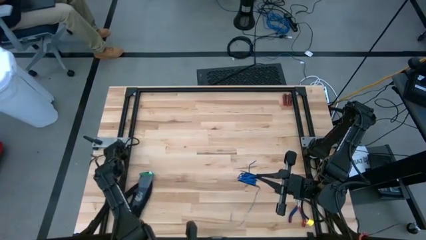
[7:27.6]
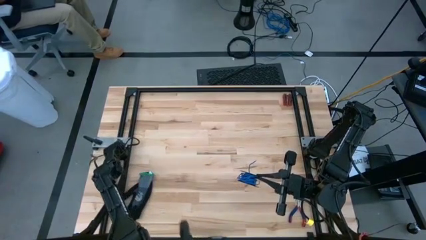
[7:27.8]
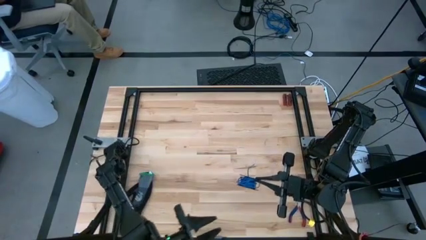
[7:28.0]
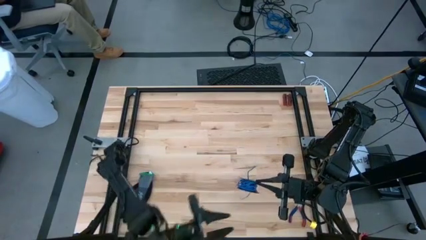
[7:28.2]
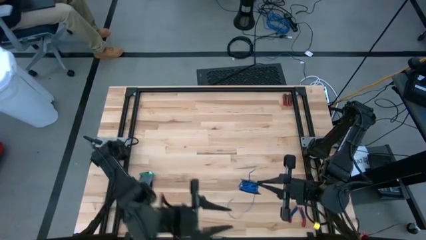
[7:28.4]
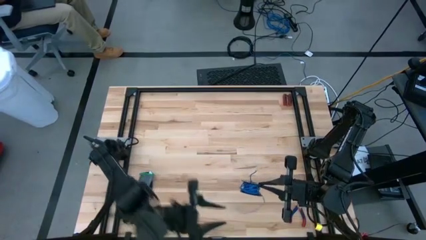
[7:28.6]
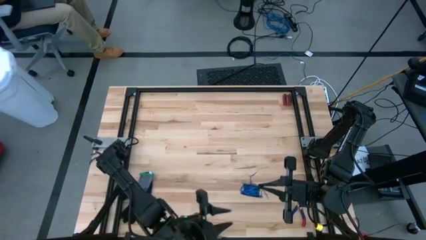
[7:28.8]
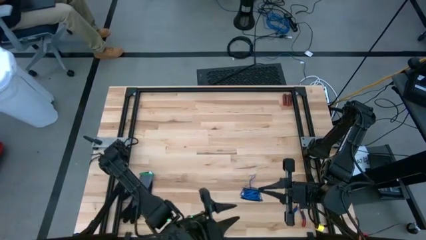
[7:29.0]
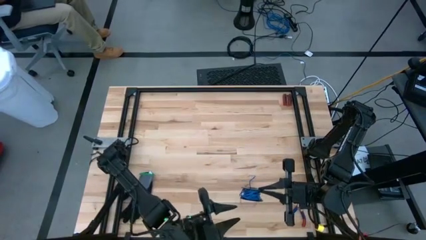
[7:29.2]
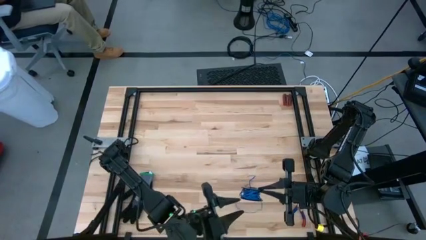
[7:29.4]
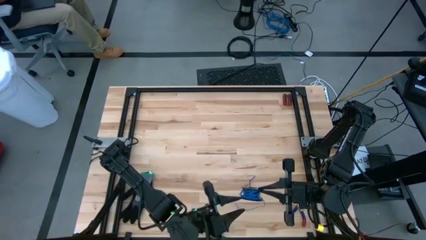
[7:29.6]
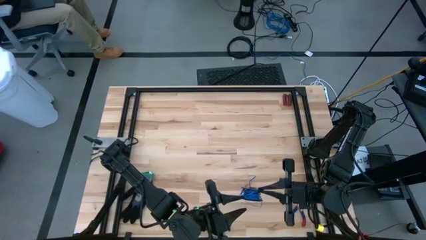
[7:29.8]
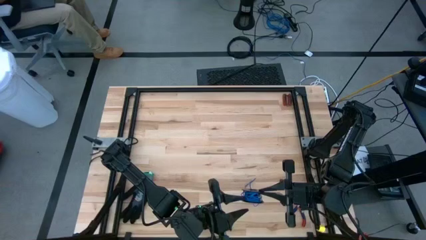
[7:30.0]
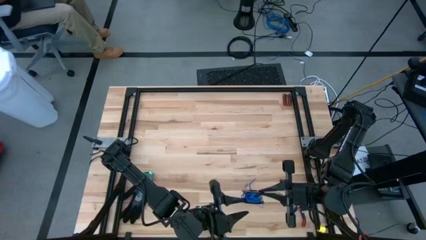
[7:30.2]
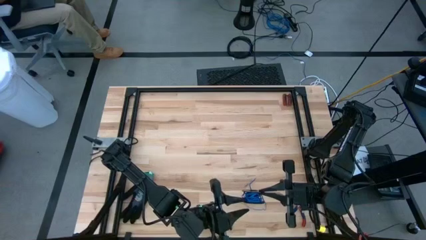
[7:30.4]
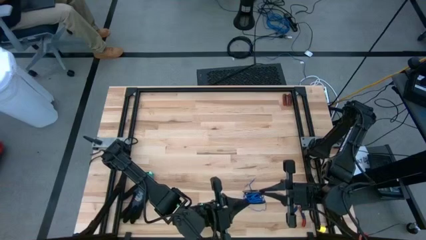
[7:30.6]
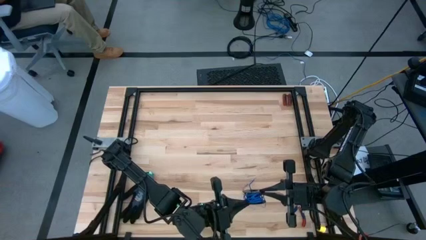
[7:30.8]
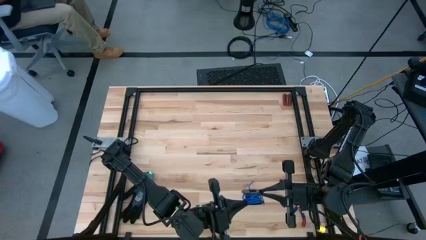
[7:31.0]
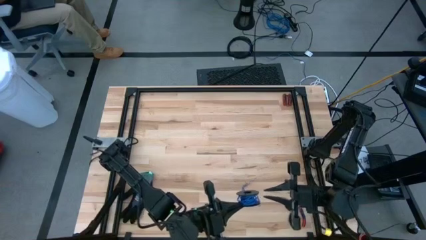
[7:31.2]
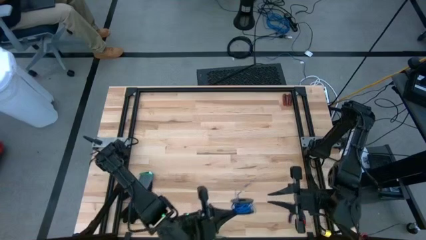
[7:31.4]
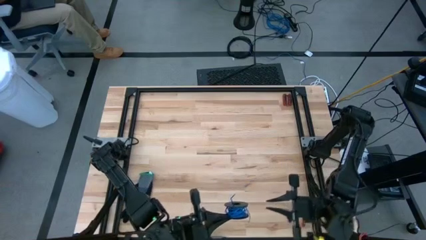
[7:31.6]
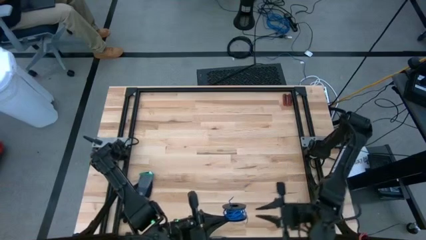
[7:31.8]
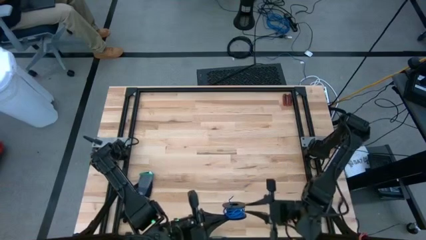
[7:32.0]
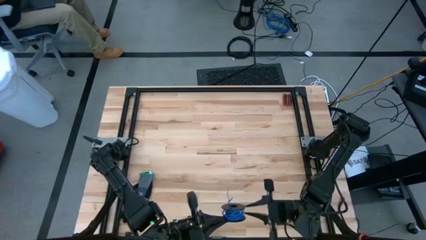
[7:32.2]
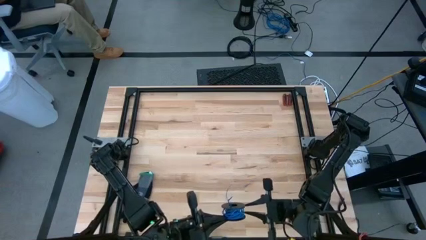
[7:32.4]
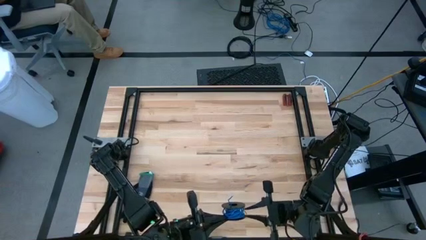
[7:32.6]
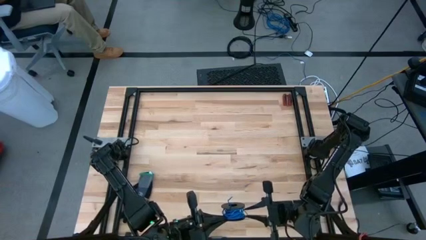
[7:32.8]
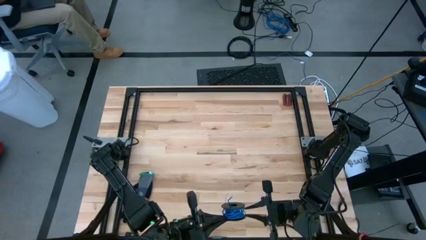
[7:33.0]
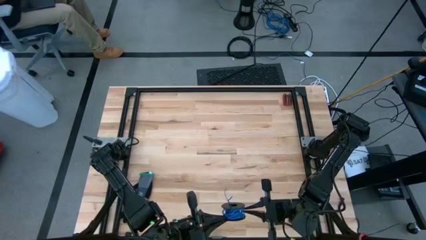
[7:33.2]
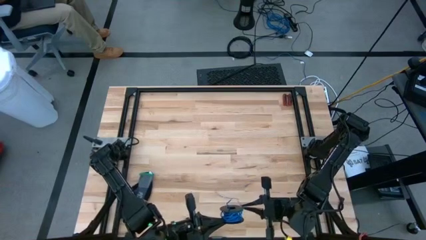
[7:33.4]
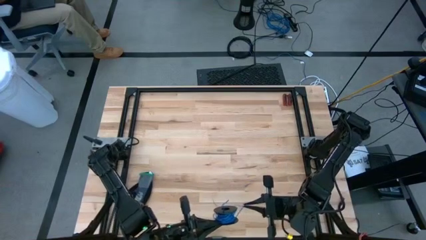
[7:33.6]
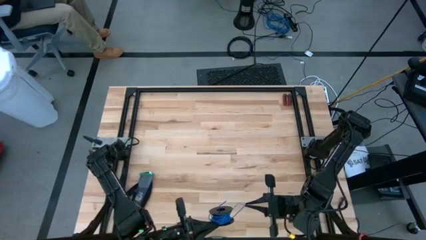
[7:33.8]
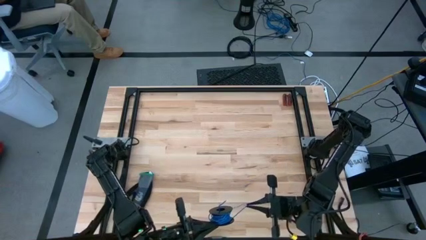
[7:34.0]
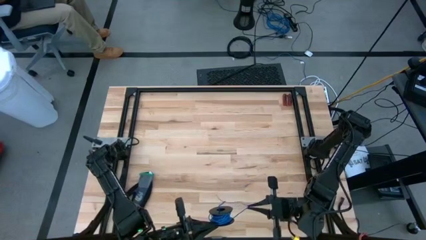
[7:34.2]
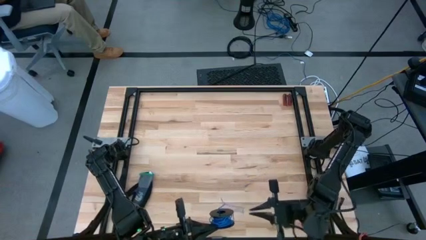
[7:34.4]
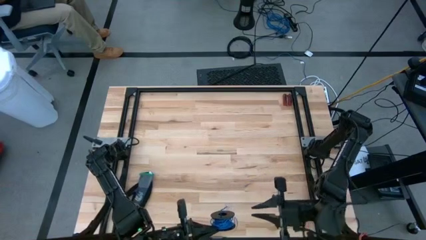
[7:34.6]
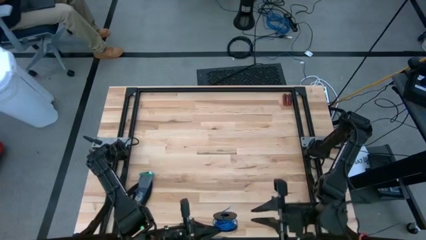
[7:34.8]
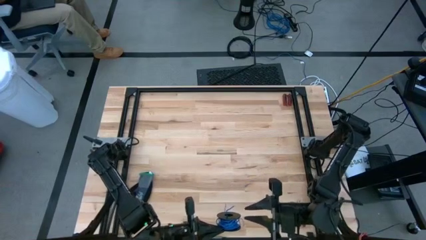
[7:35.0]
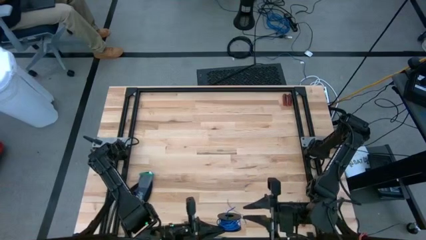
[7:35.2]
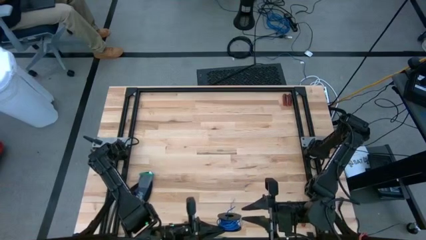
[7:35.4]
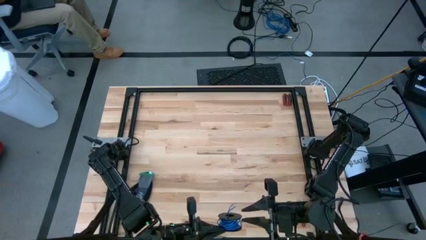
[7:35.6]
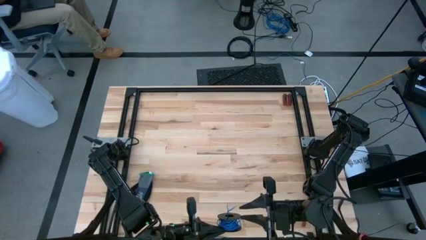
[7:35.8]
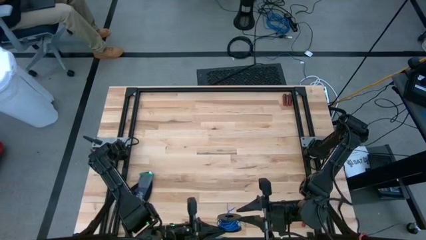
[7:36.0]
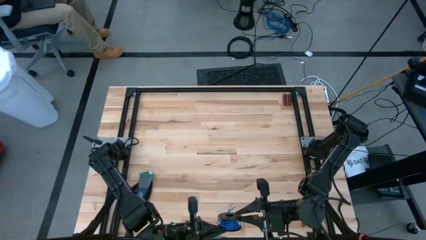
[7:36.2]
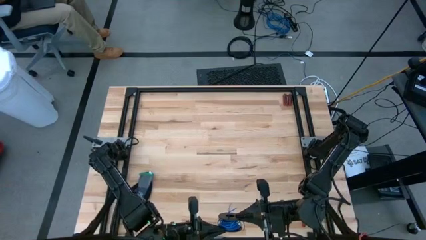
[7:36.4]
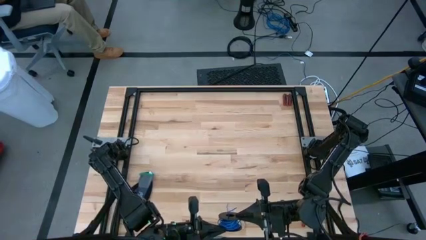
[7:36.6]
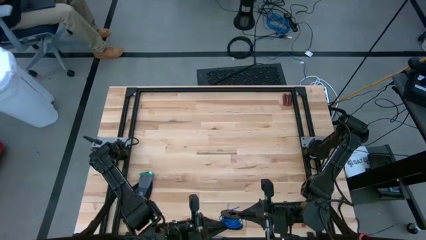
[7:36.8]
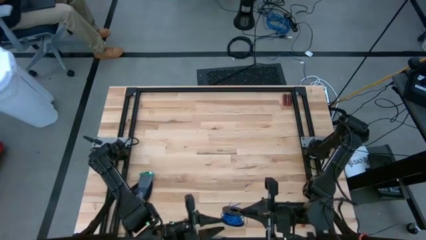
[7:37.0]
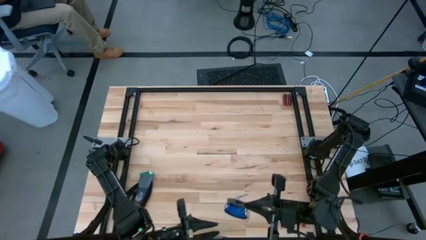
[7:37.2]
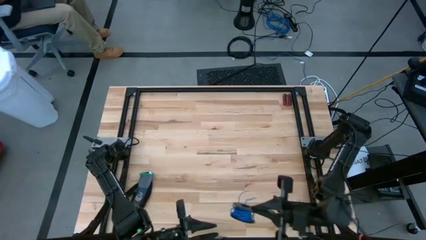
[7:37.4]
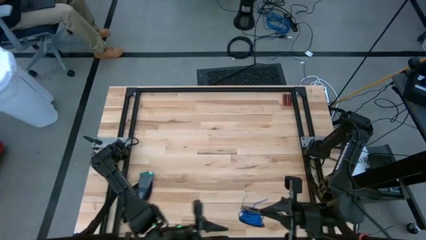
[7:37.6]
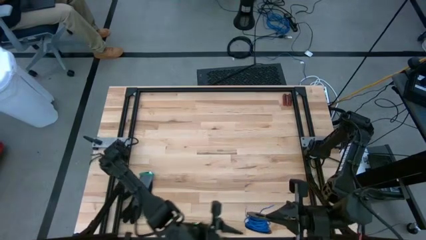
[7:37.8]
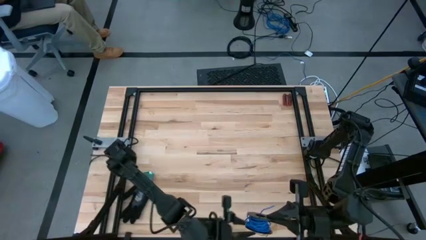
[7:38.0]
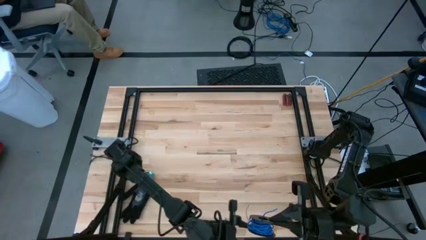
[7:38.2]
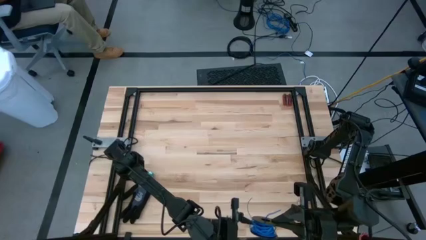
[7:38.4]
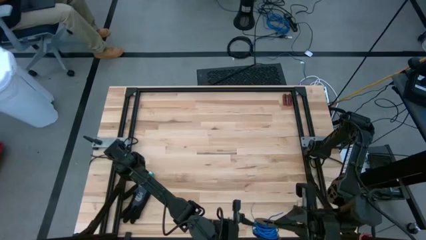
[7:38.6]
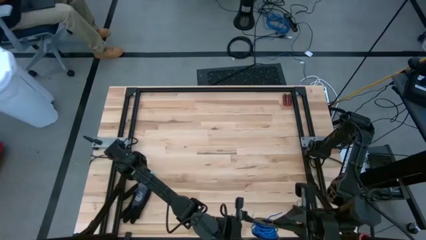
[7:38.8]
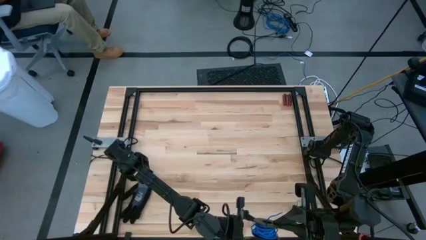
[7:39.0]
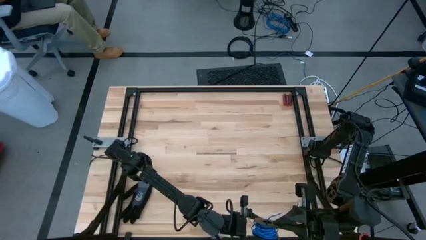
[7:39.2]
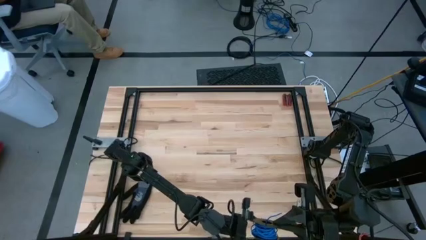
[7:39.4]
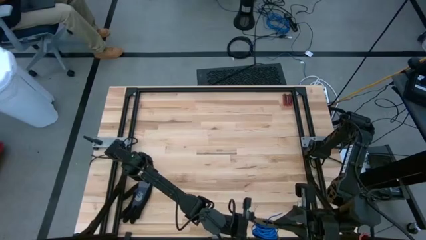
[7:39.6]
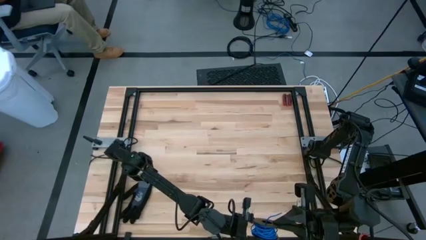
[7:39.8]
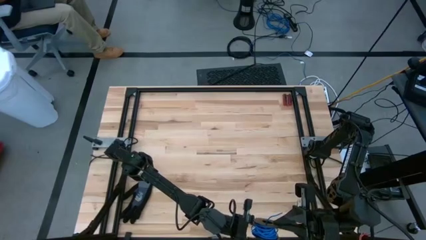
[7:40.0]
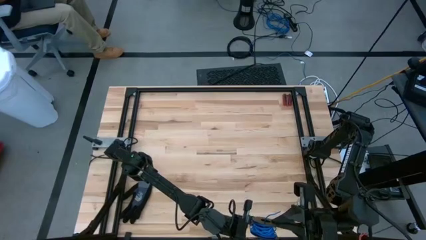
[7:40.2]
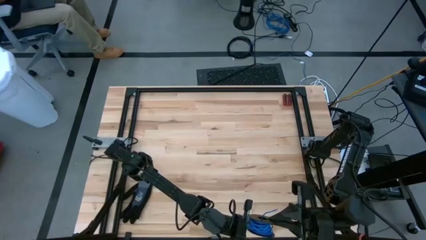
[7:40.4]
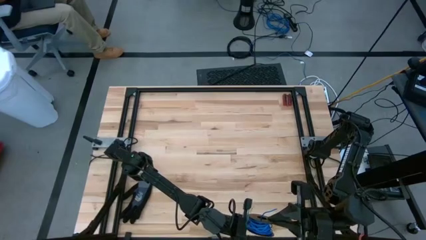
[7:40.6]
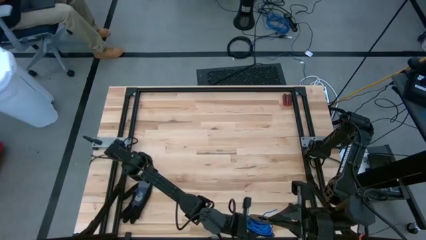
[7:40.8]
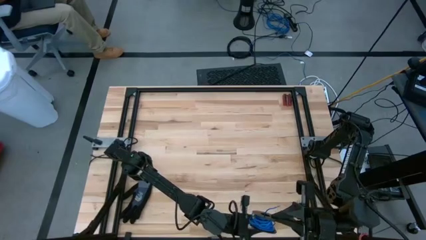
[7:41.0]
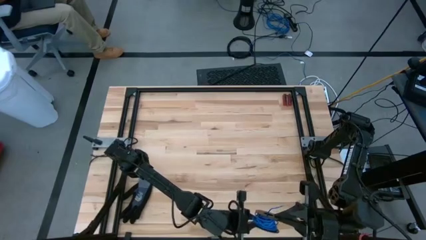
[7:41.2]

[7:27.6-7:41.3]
Task: Coil cords
Coil the blue wire onto the spool

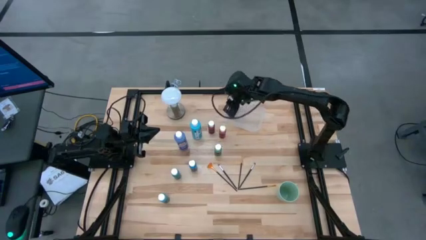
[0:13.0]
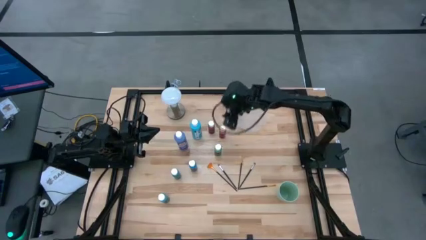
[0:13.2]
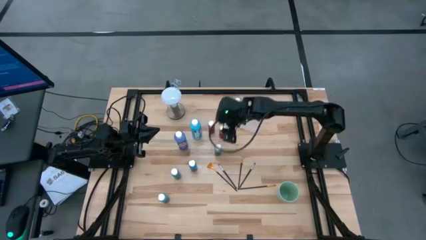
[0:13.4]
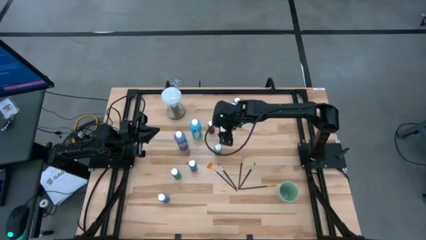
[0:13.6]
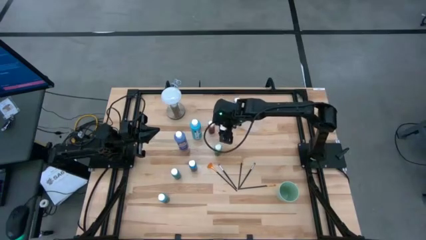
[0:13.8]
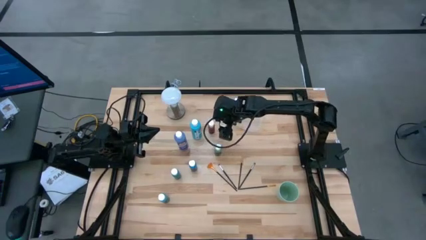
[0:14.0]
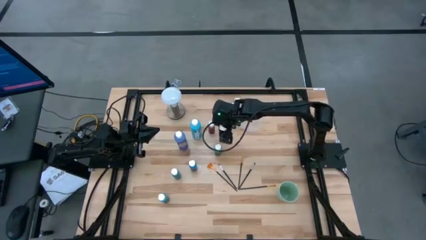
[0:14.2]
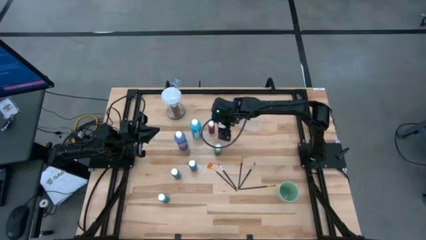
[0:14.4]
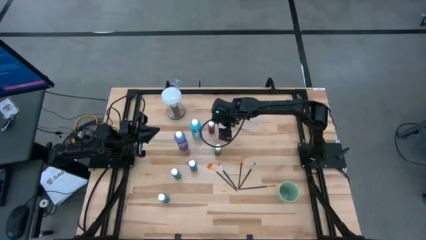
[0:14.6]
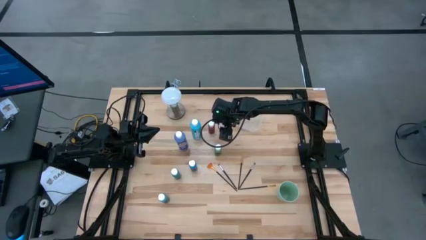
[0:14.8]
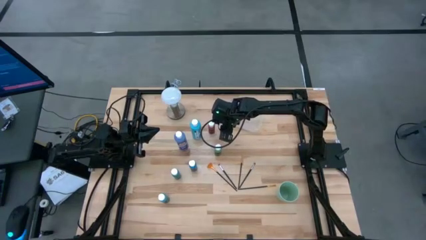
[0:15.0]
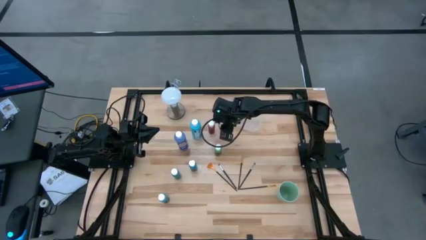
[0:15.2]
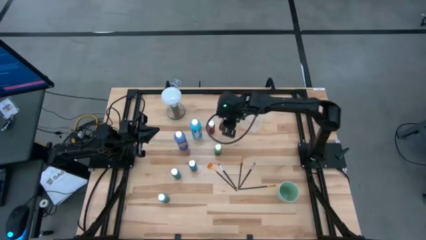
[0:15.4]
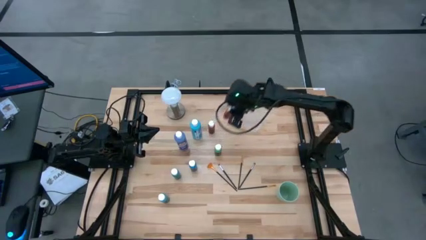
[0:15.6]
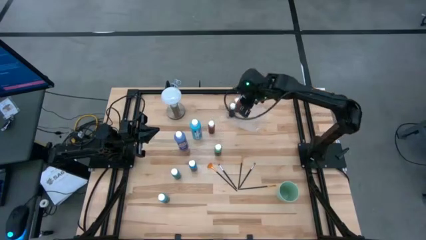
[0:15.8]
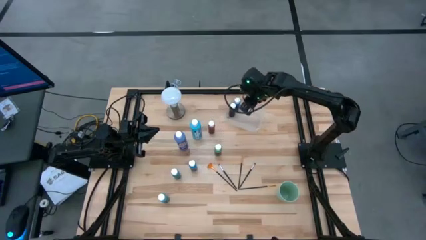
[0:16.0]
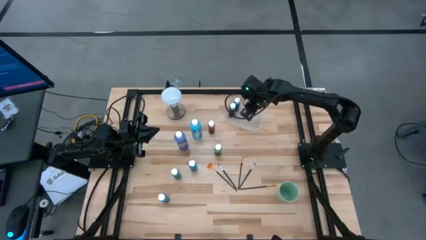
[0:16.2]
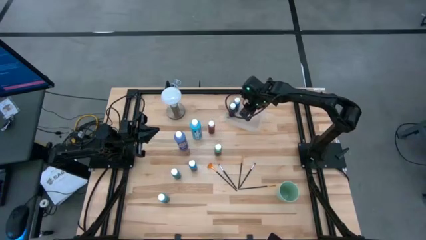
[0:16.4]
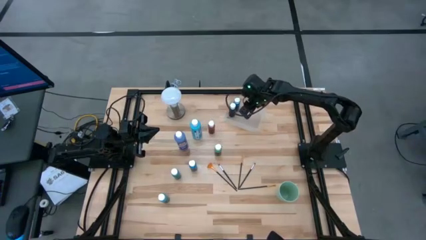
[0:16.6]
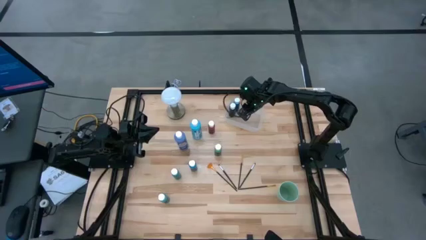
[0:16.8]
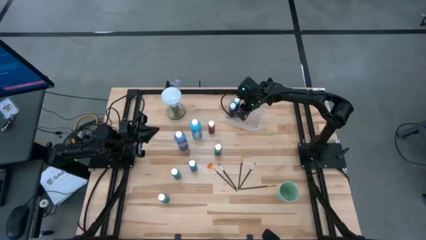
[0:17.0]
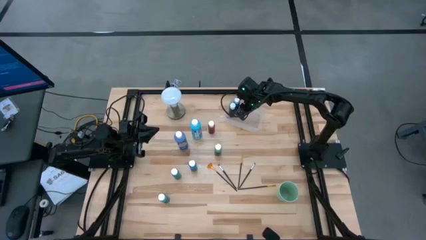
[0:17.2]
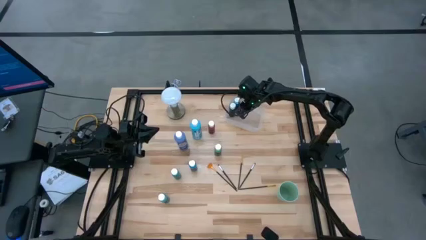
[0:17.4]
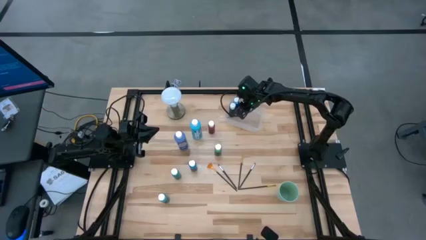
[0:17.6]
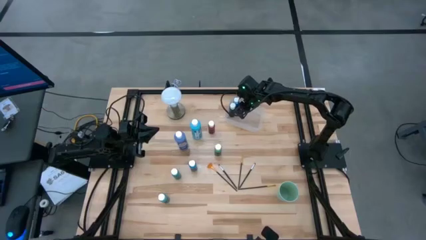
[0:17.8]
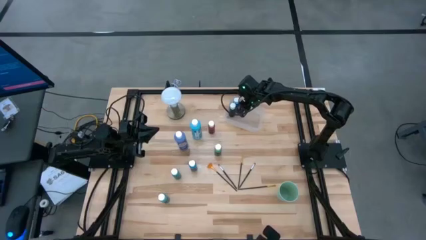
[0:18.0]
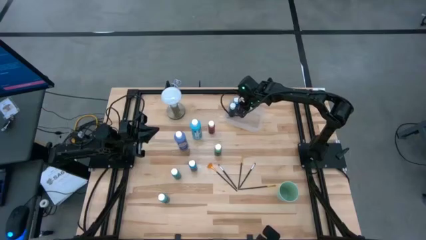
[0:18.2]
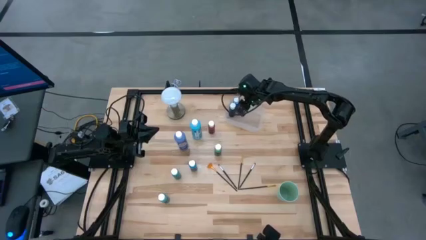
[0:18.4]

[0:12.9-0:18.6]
Task: Pick & Place Paint Supplies
Put the small red paint bottle into the transparent bin
